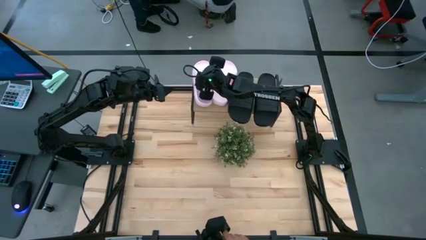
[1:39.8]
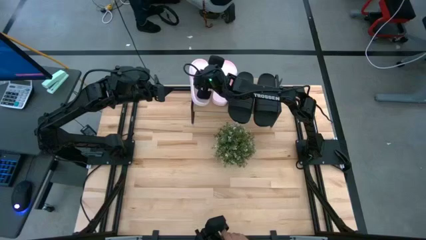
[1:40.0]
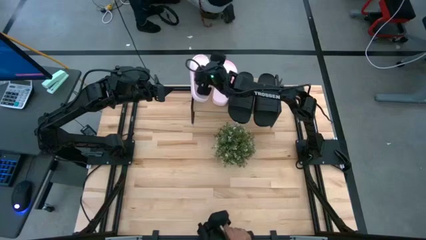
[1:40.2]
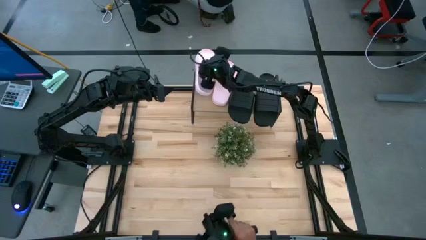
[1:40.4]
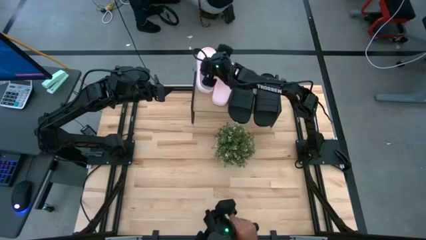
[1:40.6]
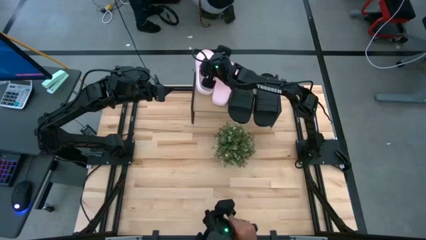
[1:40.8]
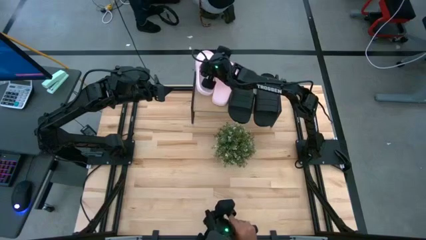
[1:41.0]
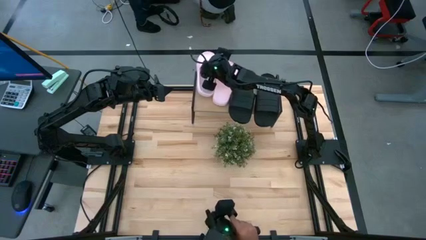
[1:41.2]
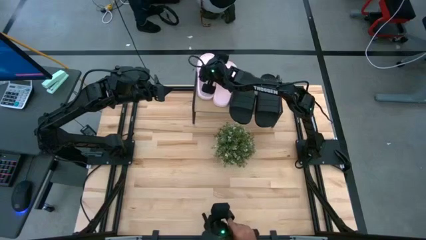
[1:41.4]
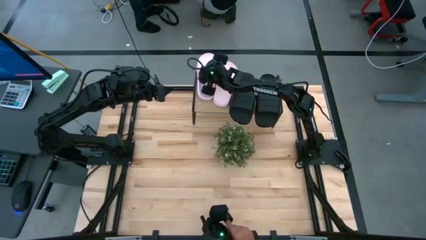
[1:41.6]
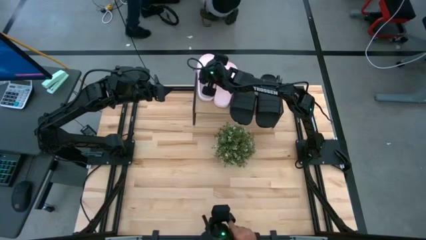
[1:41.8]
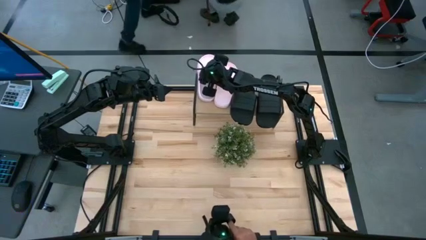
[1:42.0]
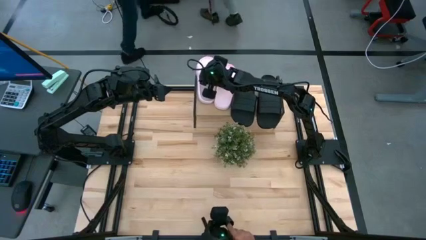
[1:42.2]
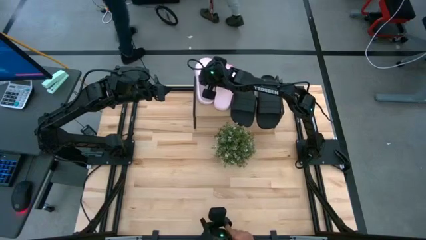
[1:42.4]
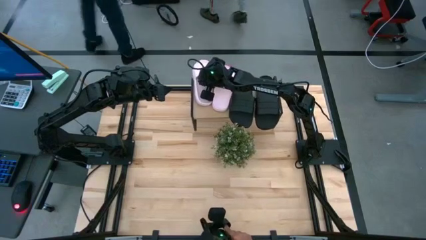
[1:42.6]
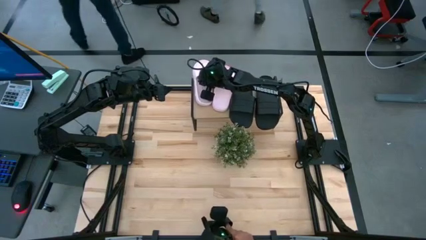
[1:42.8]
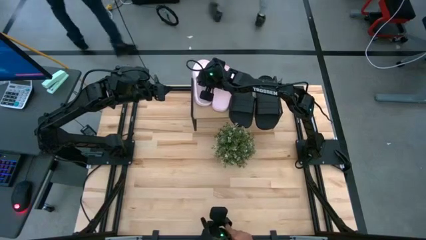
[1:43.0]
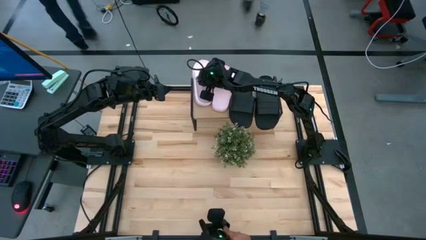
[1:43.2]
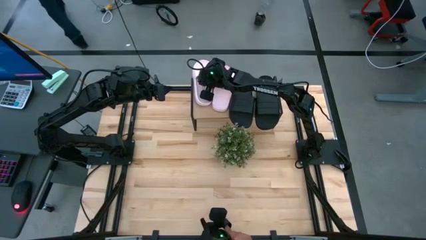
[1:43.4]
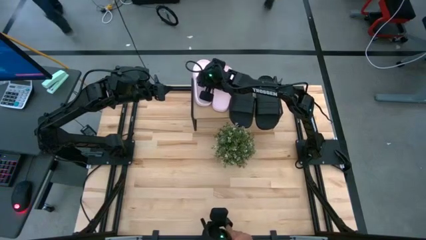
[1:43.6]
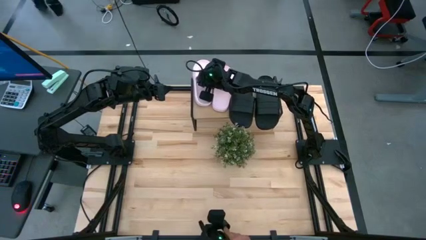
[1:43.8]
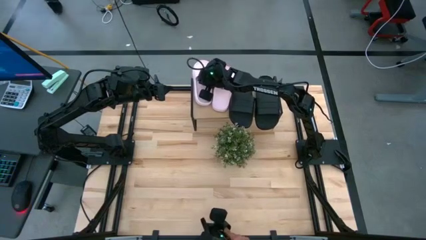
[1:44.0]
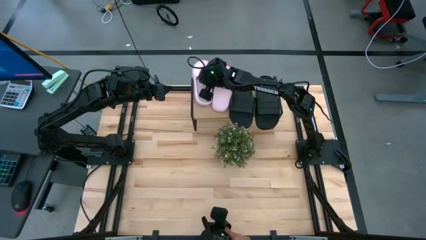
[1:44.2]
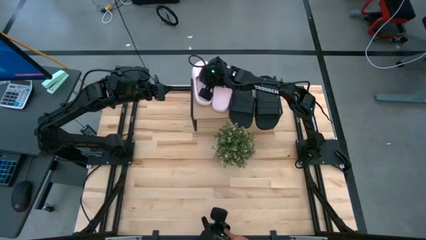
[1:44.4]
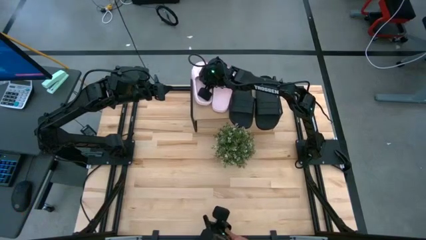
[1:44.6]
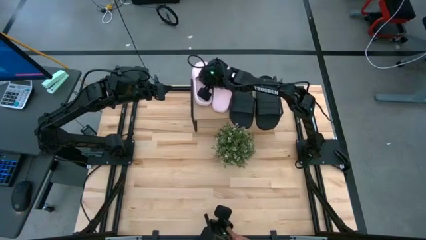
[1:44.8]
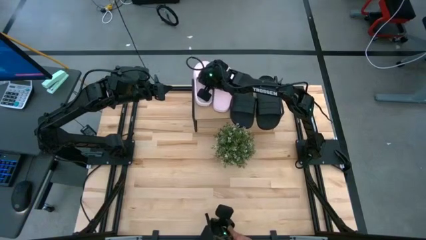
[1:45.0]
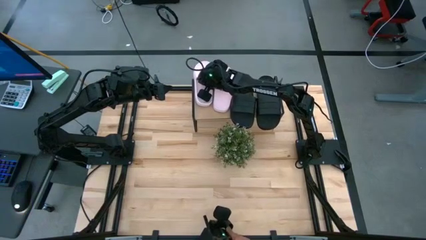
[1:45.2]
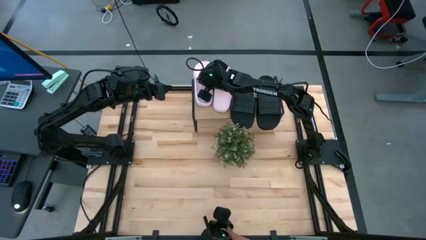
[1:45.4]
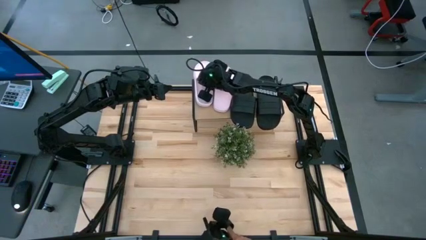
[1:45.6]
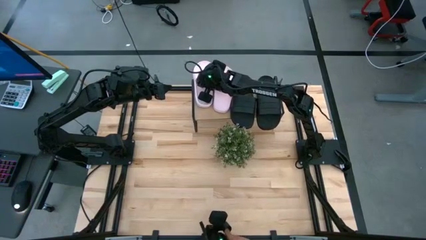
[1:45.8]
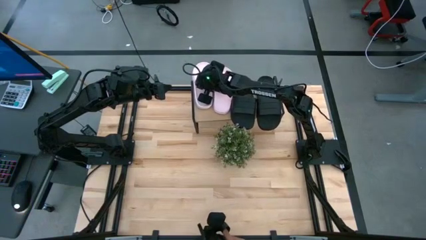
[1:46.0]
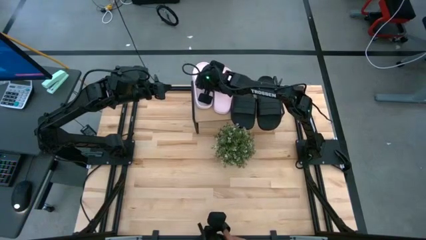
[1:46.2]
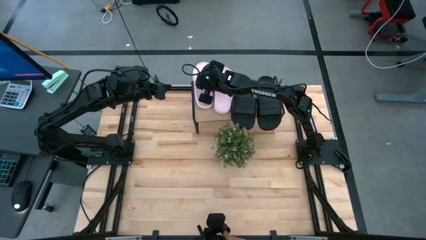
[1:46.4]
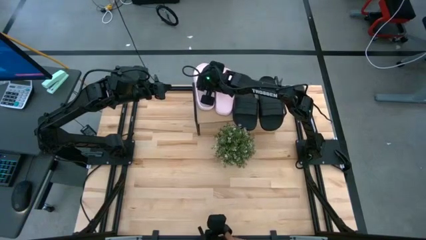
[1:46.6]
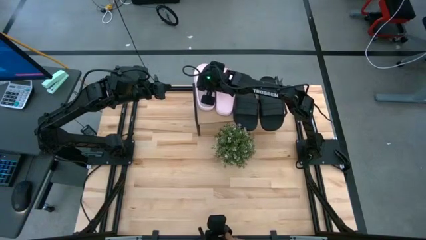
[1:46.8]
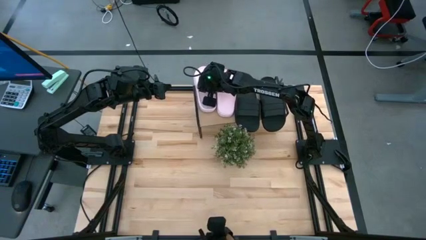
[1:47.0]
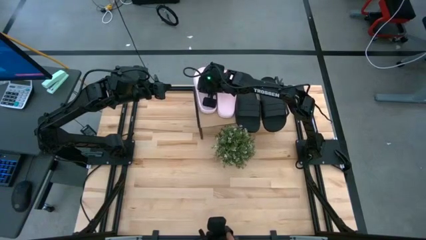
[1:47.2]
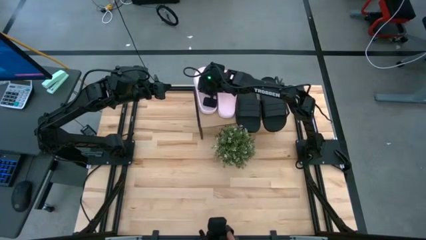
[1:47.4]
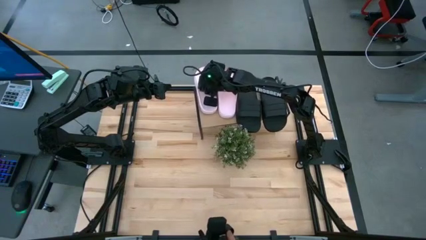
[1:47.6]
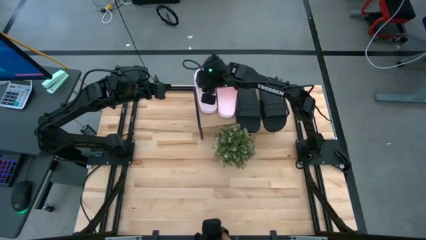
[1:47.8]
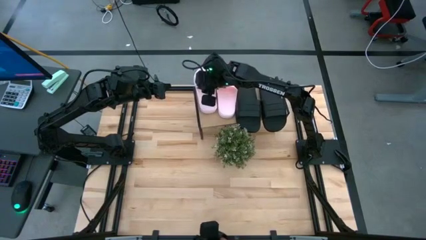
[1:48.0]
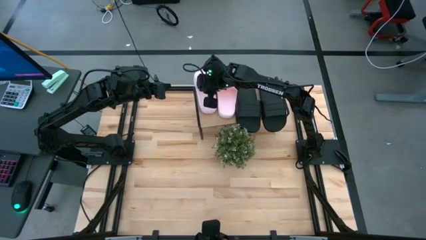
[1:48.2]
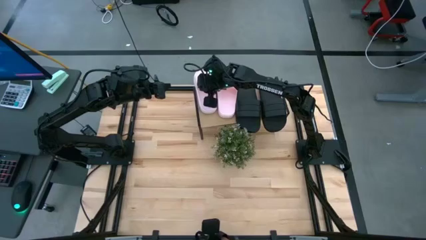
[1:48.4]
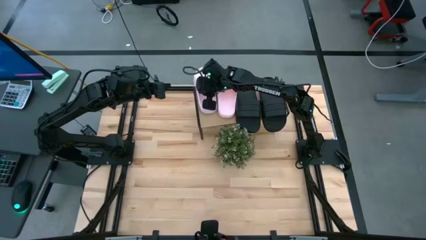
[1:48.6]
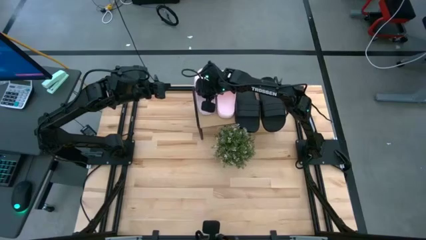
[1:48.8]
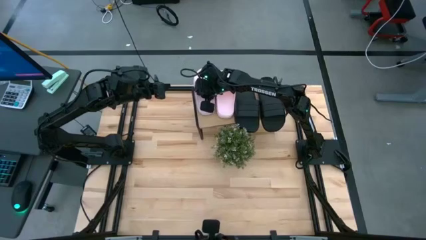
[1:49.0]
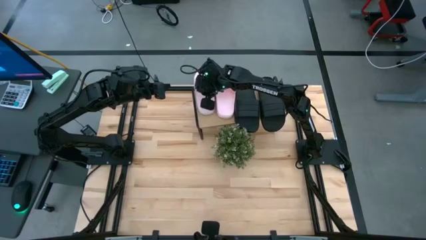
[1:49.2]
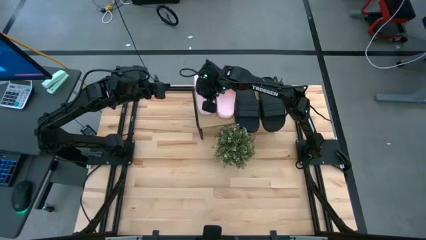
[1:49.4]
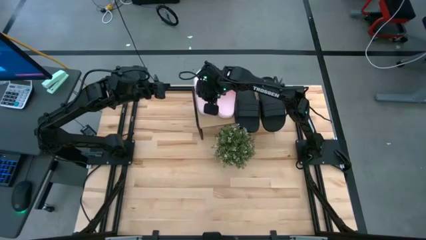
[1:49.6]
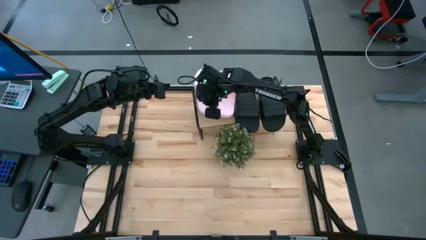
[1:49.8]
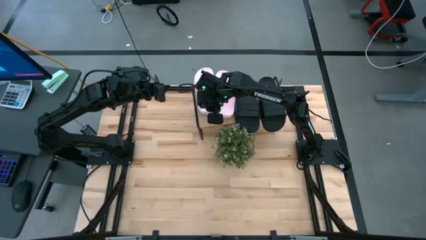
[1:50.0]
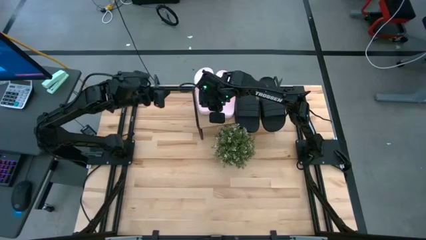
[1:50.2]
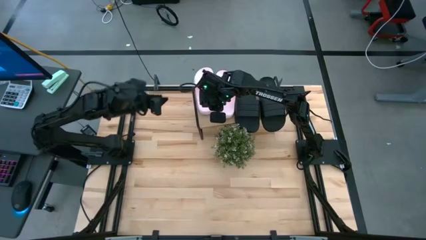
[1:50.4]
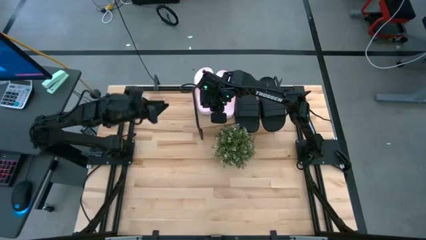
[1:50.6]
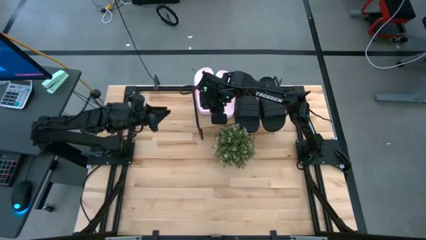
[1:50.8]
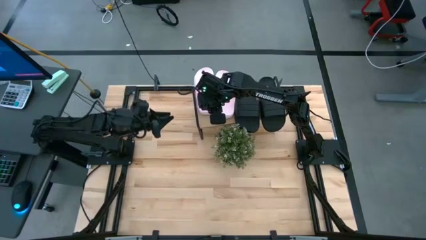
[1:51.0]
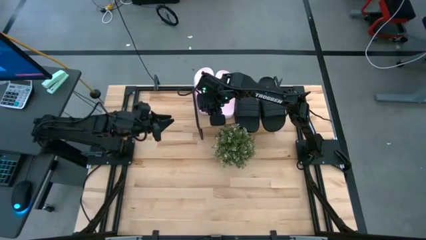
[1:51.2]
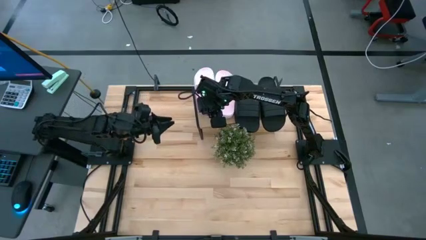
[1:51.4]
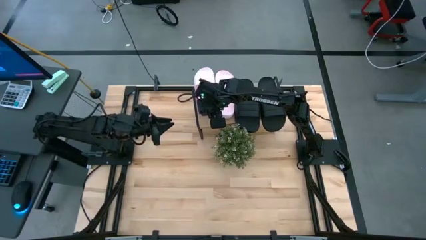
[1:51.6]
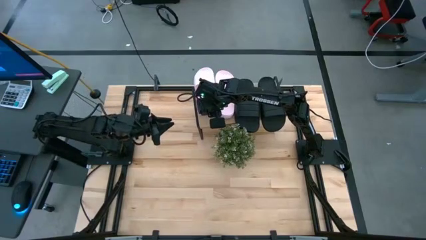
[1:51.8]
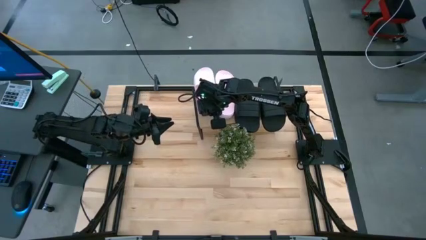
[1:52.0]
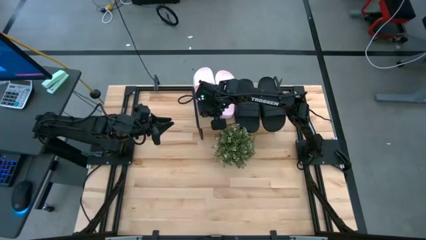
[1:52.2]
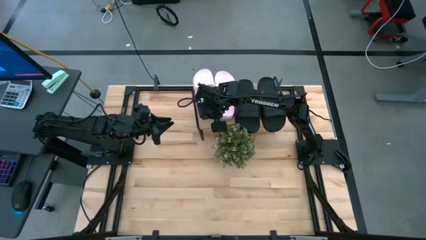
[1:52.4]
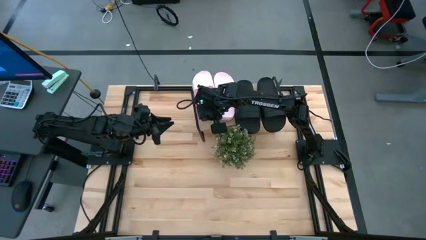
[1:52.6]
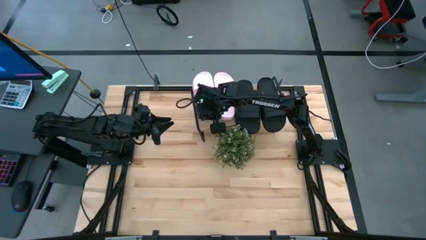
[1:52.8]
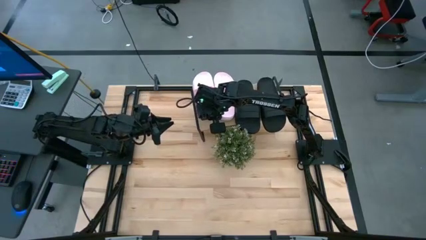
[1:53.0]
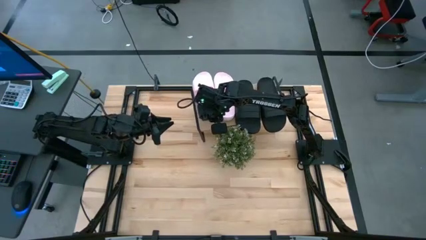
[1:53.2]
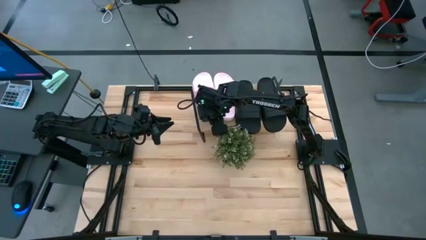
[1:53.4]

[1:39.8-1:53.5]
Task: Pick and place slides into the shelf
Put the pink slipper on the shelf
